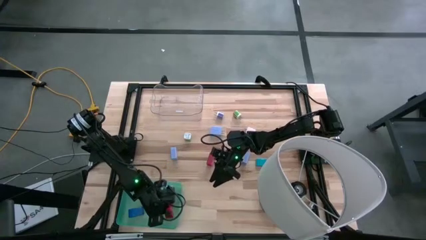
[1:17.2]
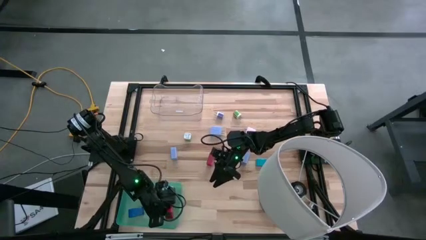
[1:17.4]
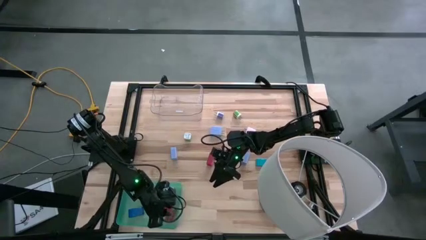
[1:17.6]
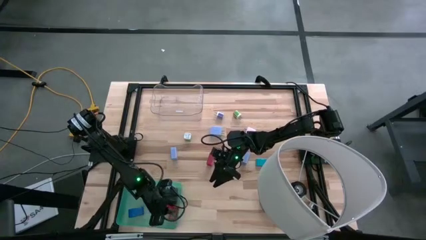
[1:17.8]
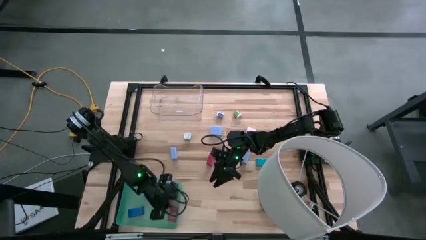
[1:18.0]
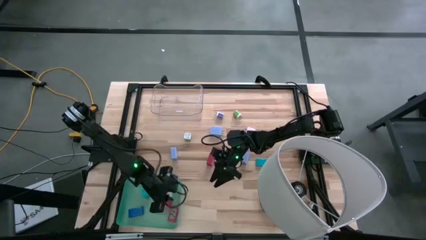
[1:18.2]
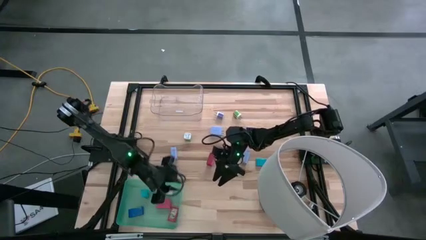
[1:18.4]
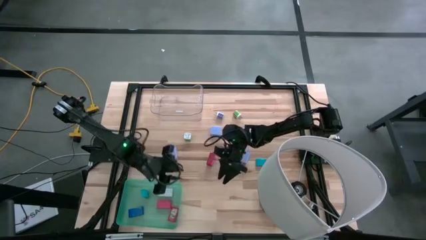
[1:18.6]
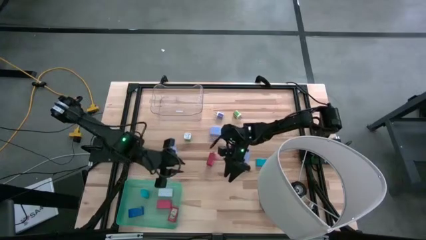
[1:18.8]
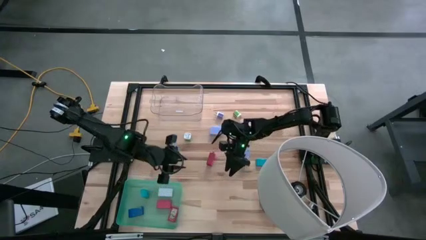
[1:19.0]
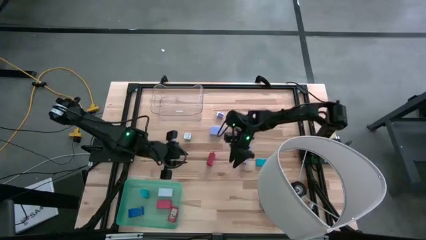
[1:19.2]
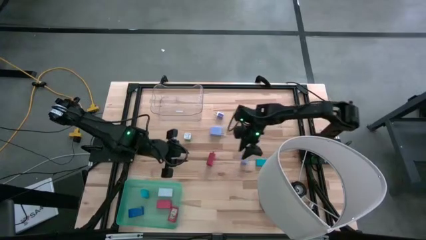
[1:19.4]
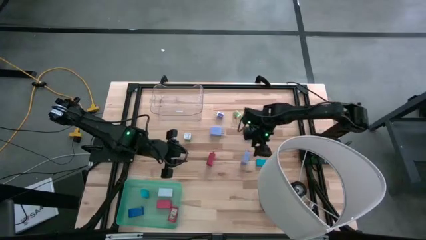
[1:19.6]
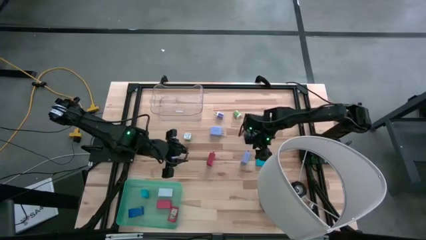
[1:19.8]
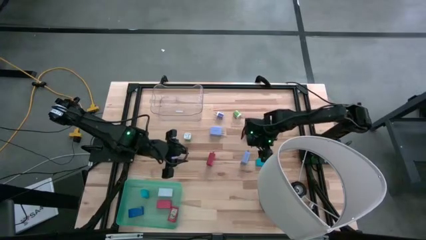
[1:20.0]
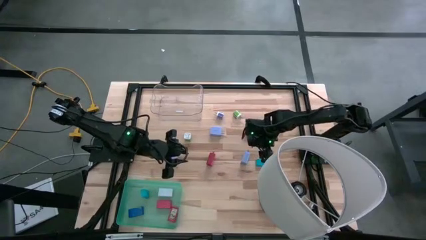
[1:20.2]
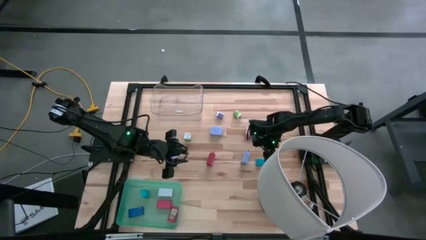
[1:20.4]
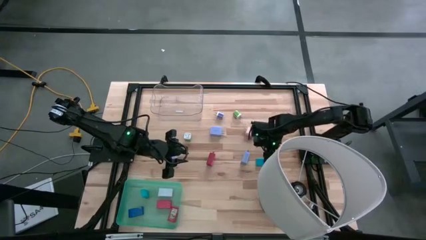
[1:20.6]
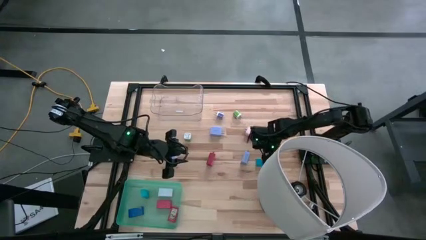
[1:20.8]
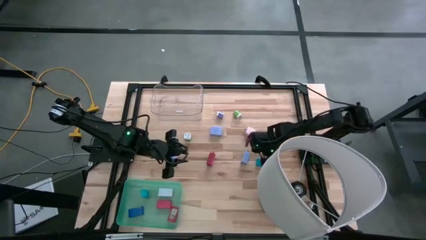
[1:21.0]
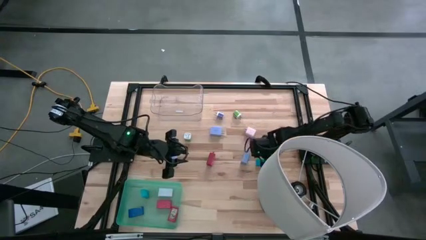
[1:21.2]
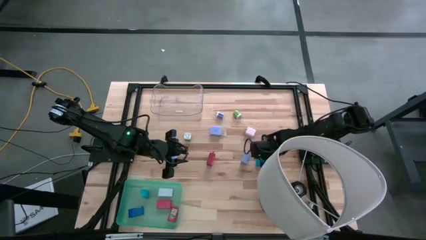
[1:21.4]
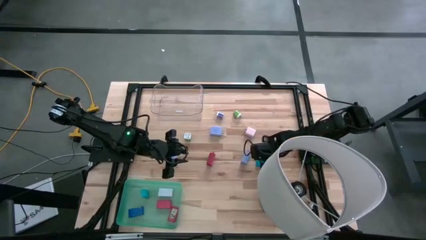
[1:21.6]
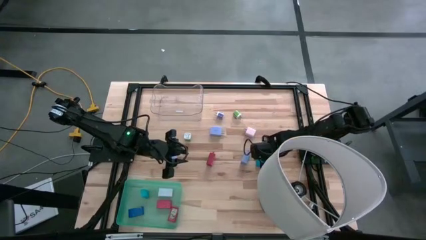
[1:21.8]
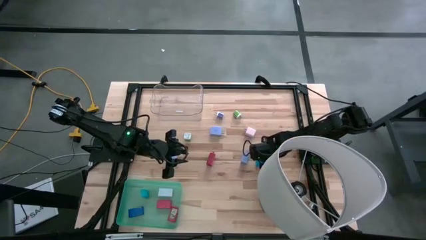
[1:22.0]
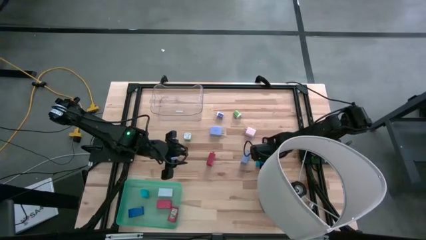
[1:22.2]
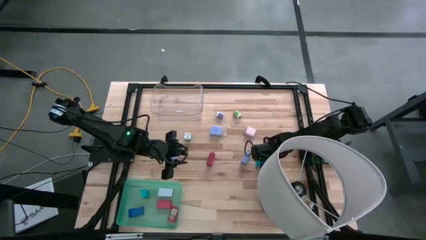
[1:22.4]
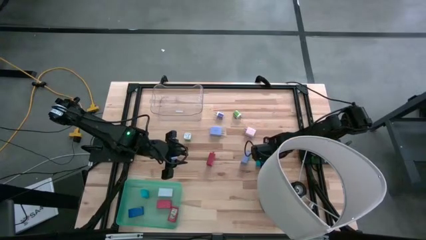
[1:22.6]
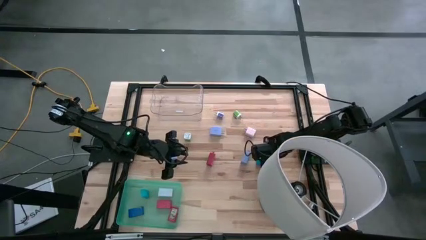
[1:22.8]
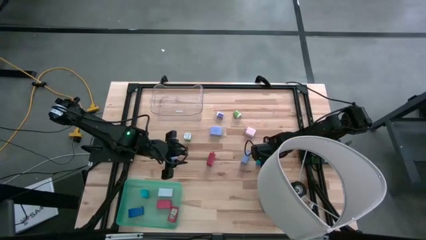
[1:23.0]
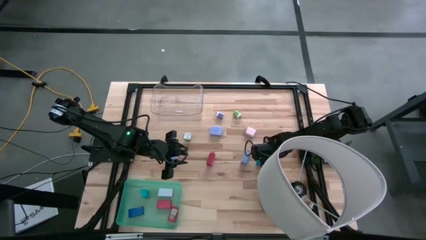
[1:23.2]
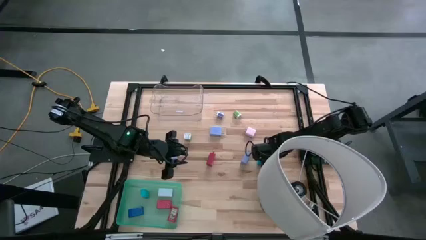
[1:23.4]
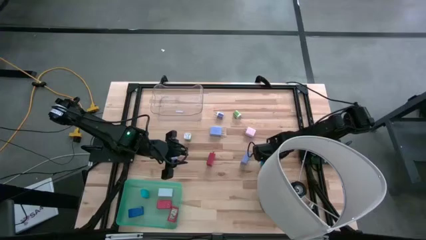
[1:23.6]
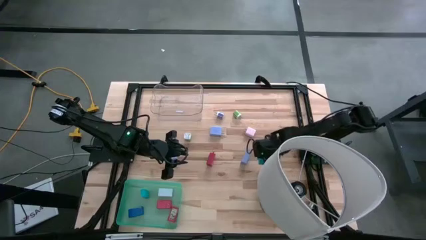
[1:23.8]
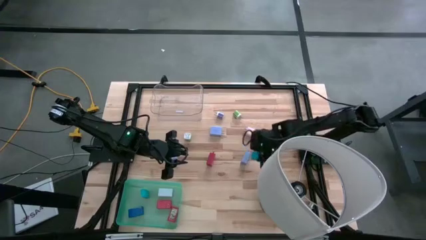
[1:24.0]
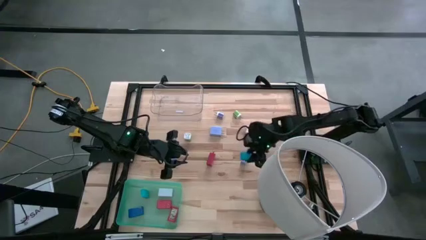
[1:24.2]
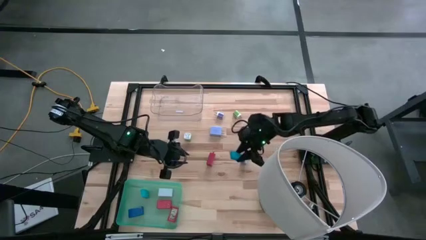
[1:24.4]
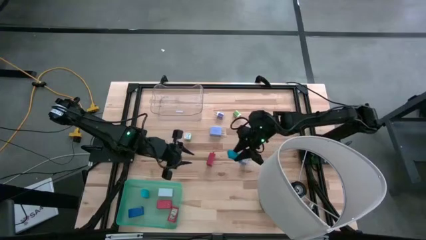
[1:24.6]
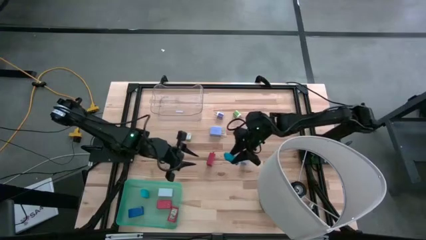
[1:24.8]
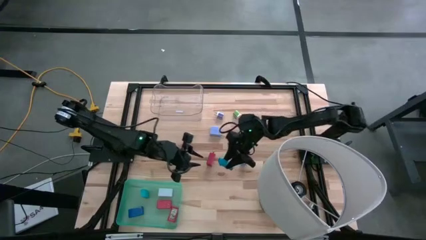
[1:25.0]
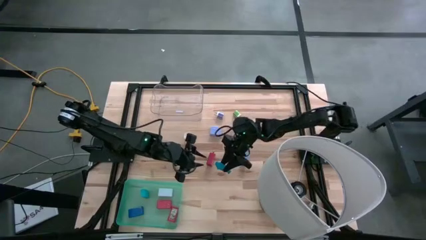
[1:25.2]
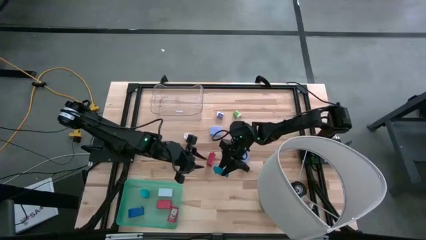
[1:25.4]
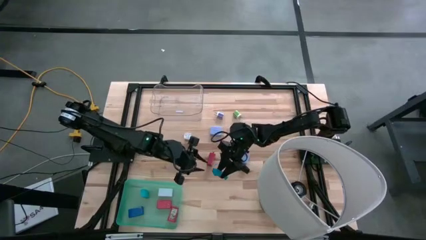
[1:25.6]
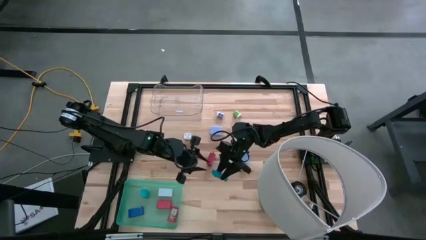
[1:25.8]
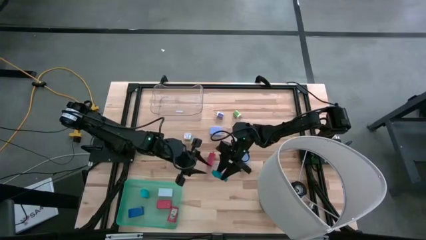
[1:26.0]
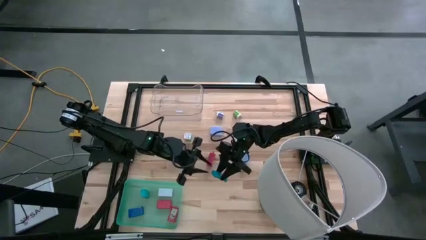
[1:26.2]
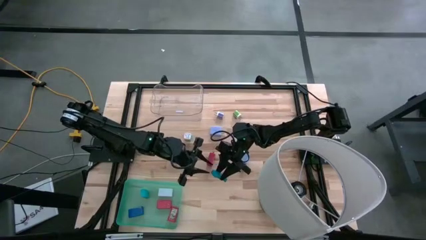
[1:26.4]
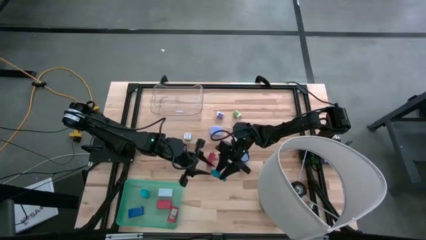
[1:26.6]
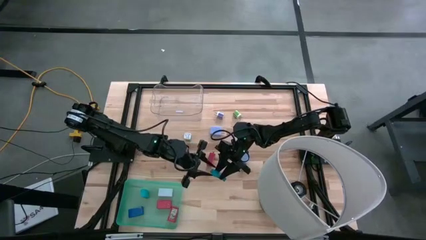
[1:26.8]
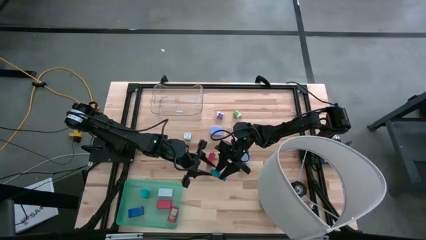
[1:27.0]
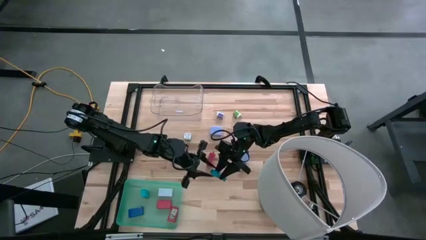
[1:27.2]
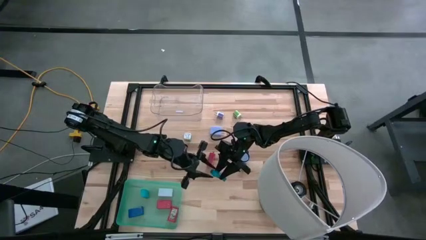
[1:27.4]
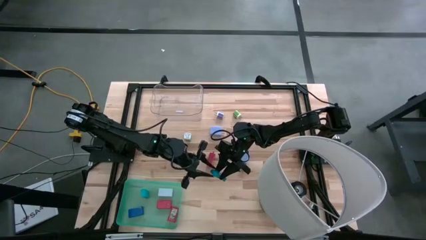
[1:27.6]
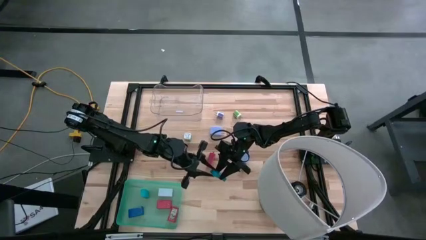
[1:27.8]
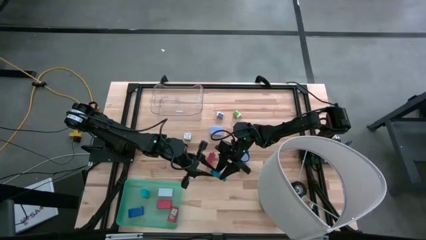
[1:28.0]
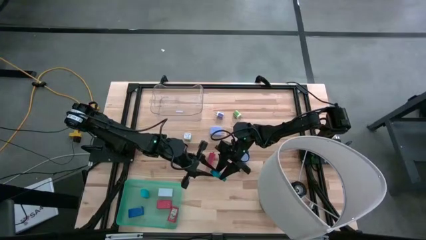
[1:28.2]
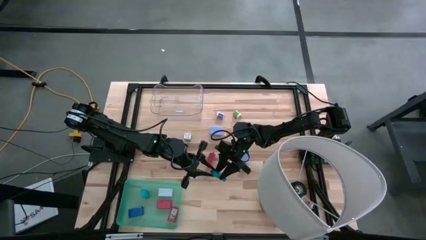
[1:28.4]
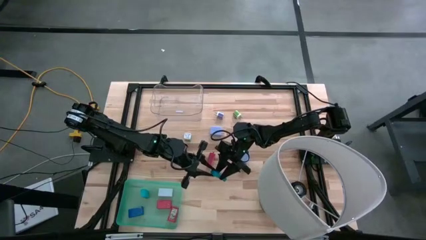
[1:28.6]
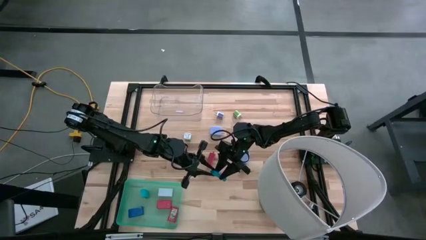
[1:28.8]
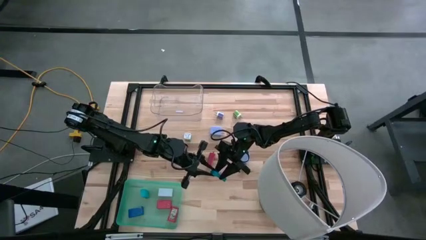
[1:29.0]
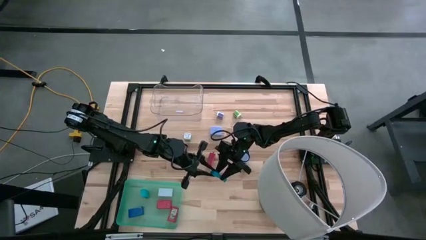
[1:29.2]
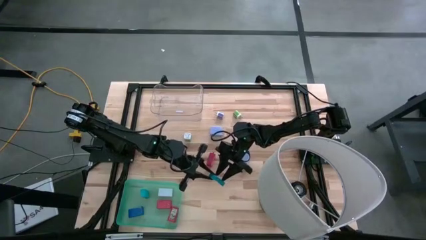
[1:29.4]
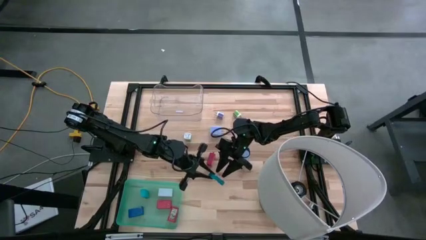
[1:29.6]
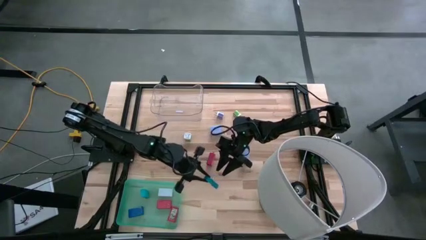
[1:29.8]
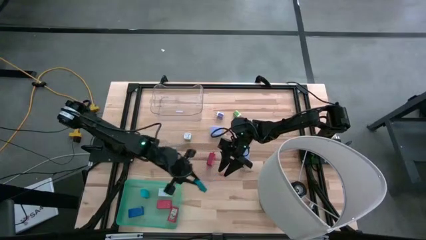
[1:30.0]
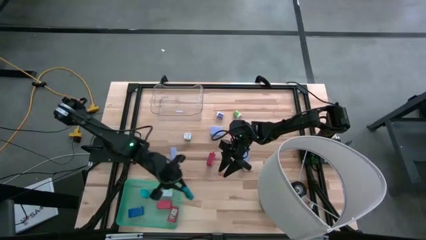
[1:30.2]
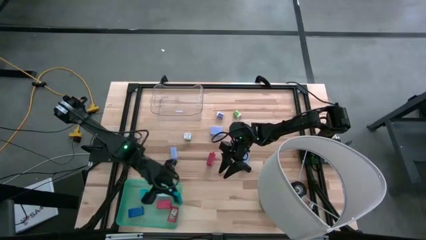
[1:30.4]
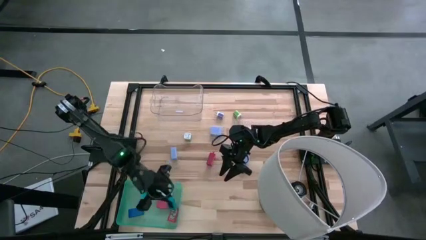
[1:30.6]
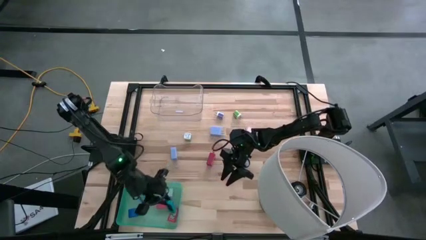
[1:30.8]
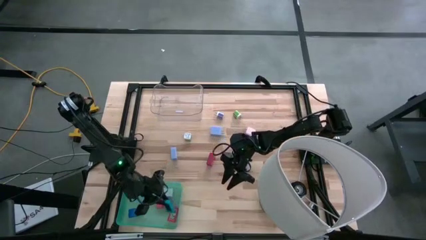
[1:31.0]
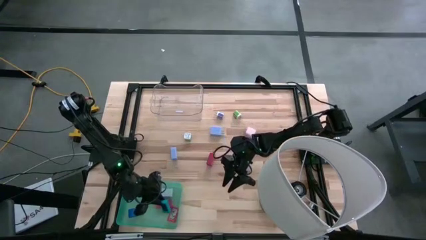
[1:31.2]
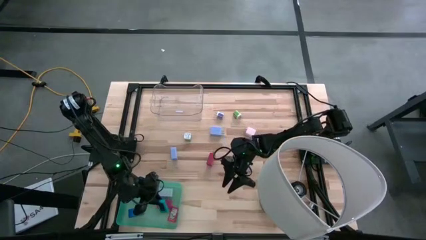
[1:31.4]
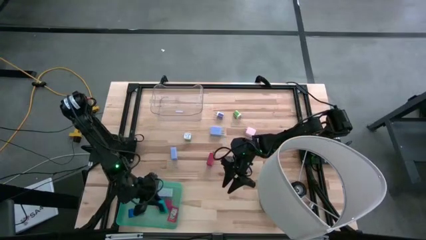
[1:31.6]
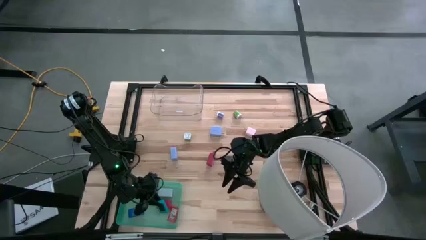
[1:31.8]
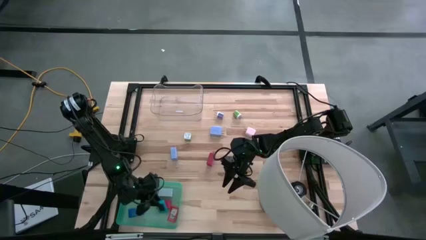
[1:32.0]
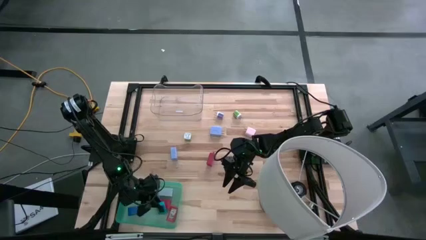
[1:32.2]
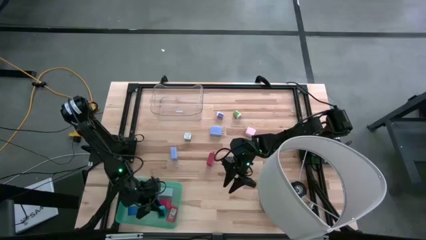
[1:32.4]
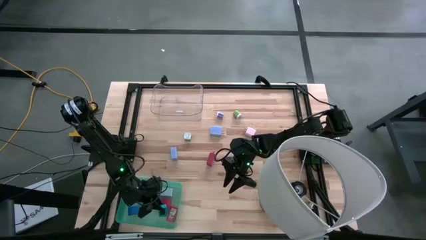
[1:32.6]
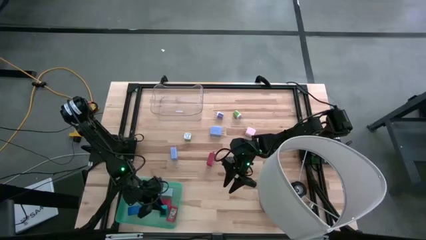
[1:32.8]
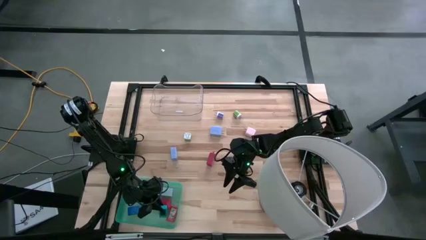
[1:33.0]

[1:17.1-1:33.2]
Task: Pick & Place Office items
Put the light blue digital clock into the green bin
